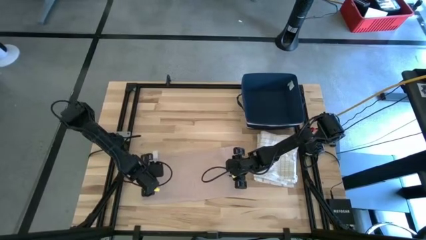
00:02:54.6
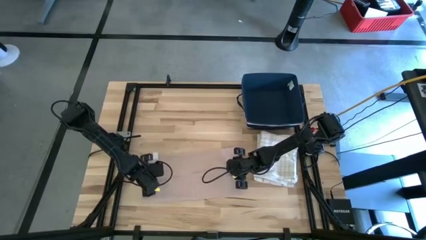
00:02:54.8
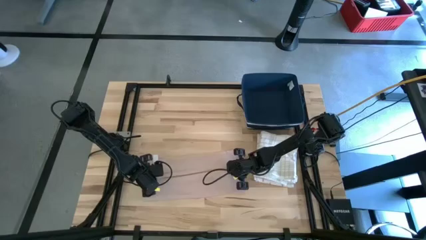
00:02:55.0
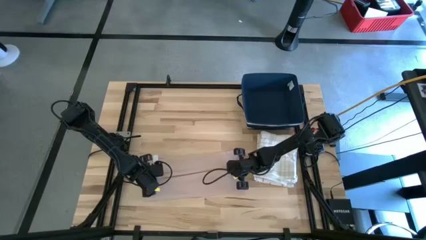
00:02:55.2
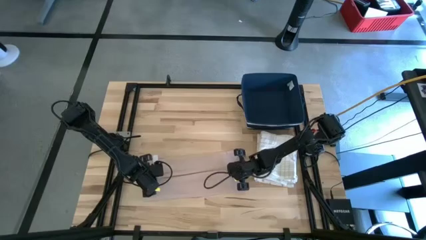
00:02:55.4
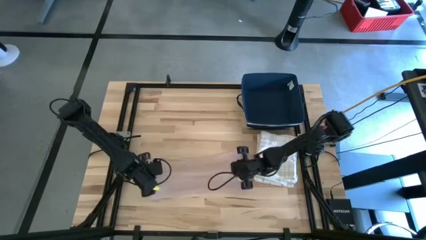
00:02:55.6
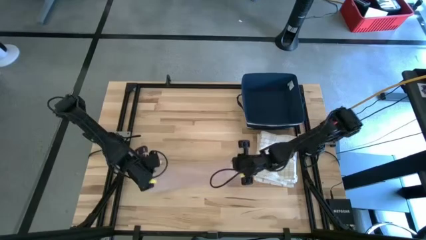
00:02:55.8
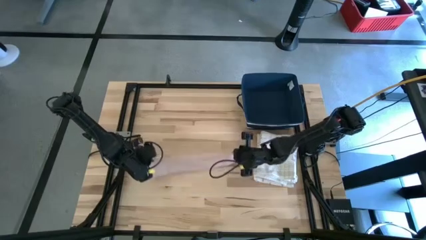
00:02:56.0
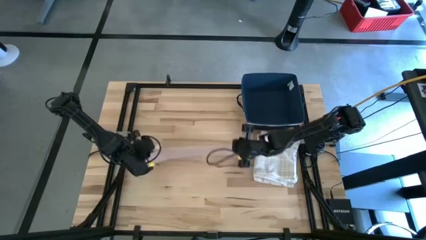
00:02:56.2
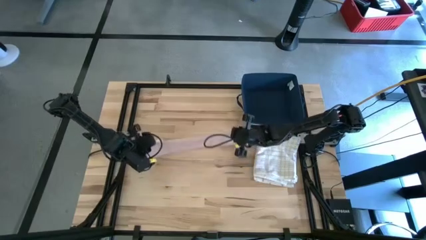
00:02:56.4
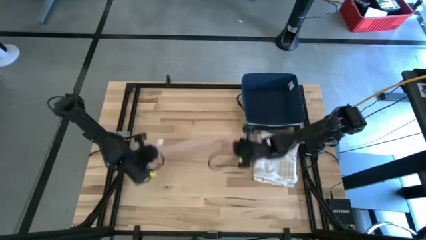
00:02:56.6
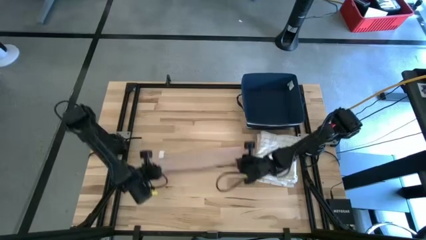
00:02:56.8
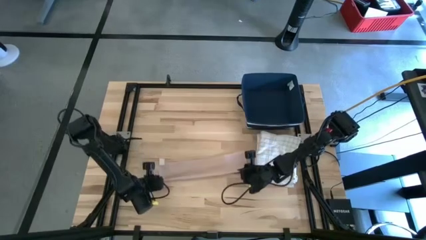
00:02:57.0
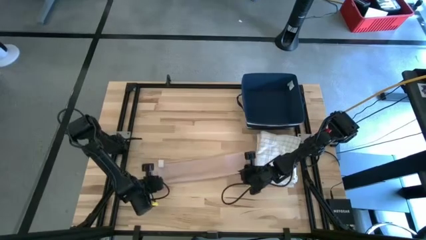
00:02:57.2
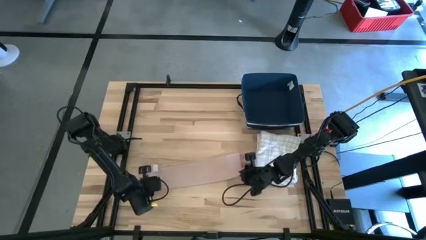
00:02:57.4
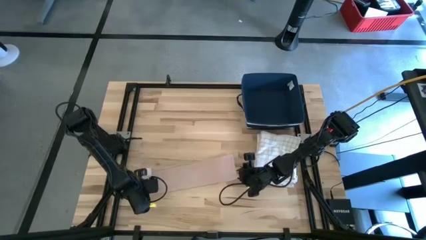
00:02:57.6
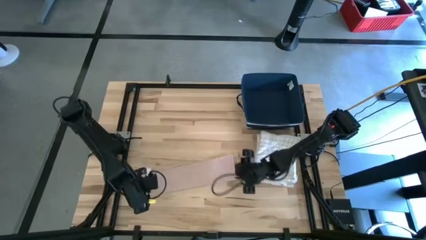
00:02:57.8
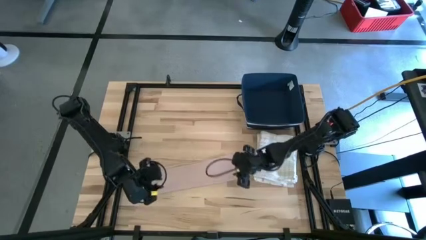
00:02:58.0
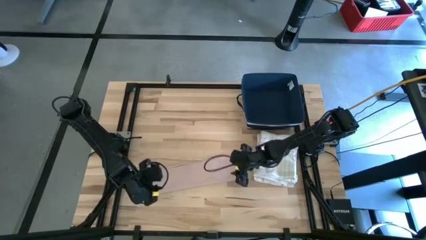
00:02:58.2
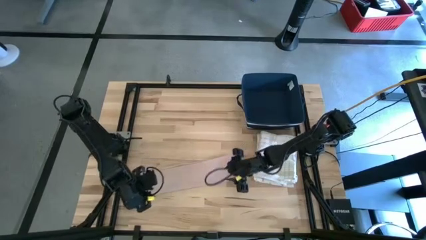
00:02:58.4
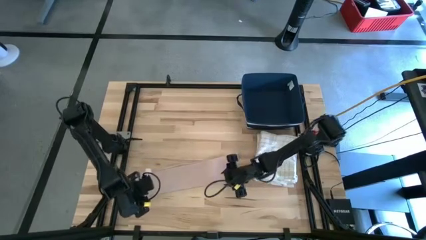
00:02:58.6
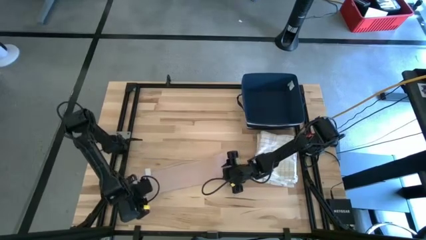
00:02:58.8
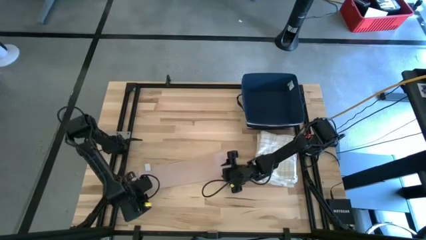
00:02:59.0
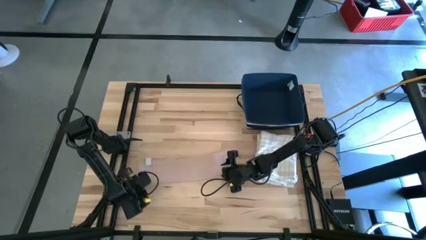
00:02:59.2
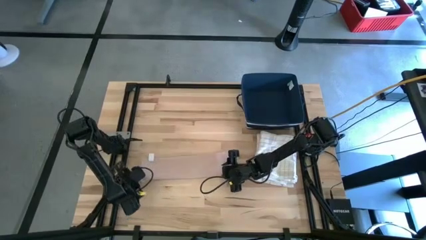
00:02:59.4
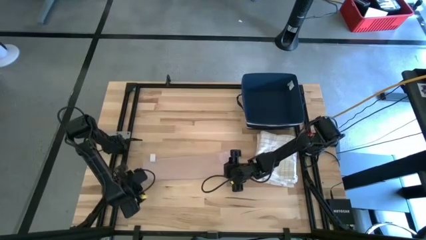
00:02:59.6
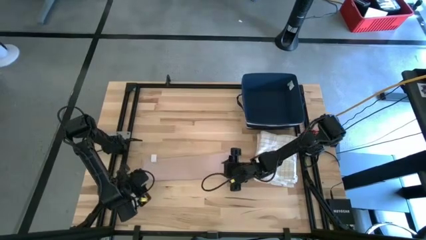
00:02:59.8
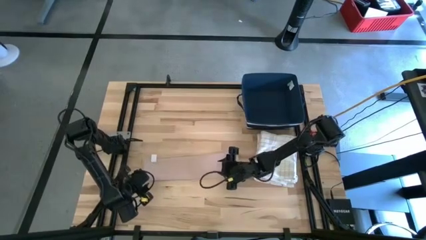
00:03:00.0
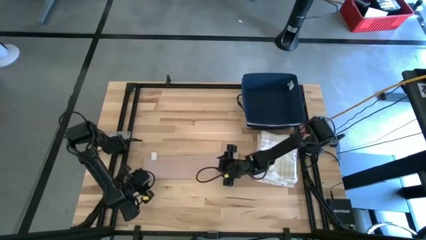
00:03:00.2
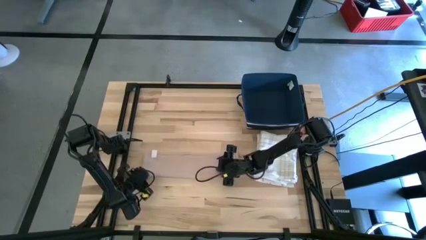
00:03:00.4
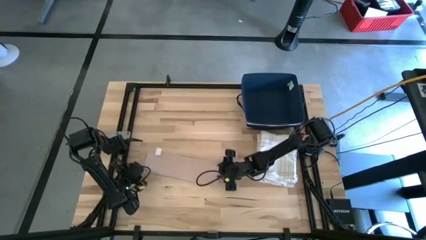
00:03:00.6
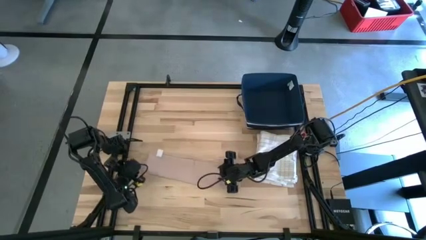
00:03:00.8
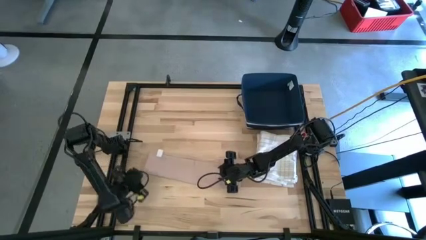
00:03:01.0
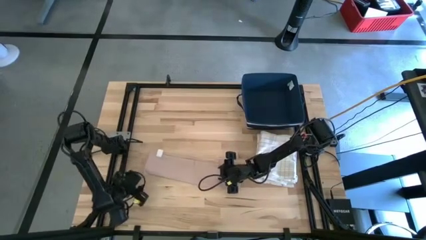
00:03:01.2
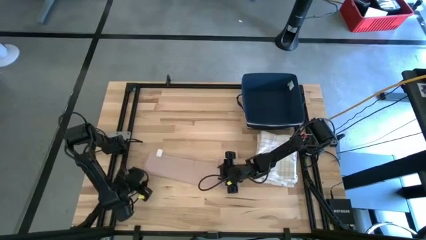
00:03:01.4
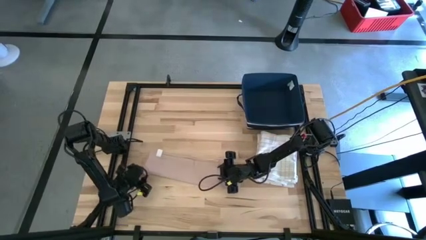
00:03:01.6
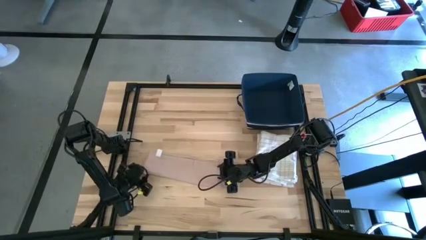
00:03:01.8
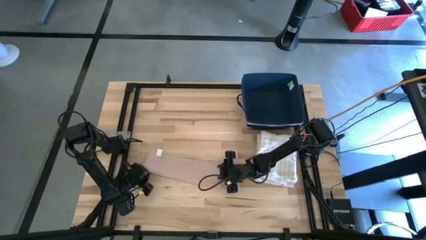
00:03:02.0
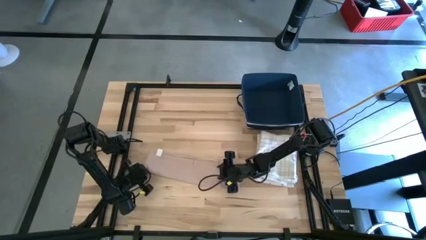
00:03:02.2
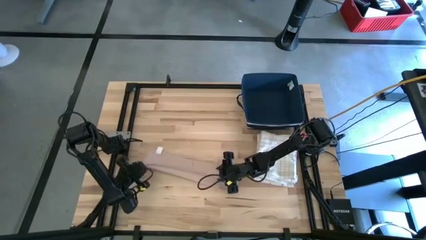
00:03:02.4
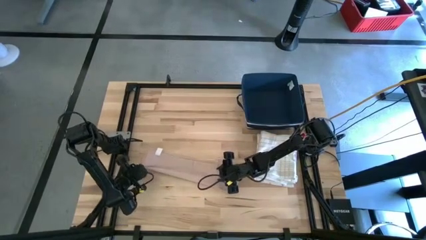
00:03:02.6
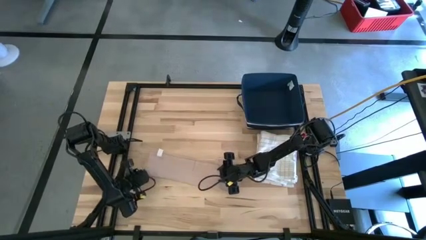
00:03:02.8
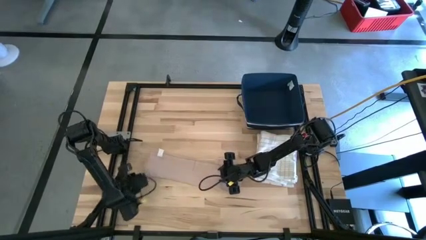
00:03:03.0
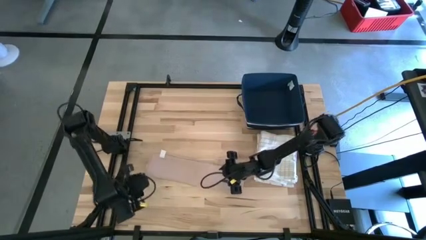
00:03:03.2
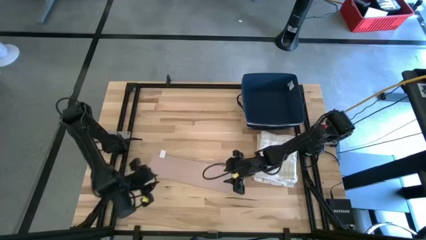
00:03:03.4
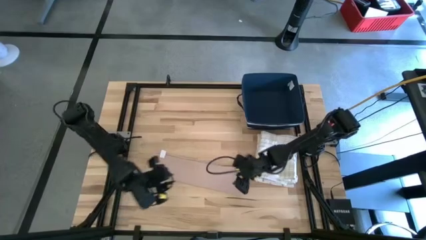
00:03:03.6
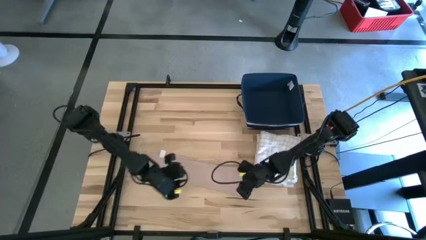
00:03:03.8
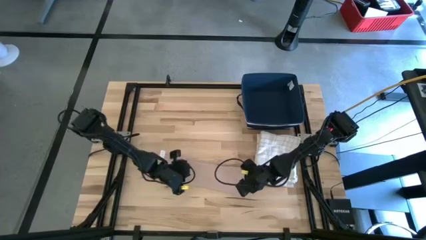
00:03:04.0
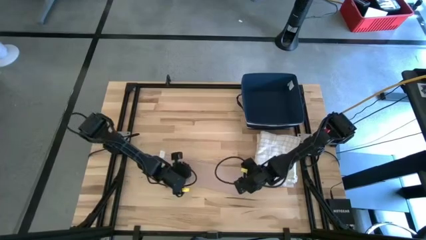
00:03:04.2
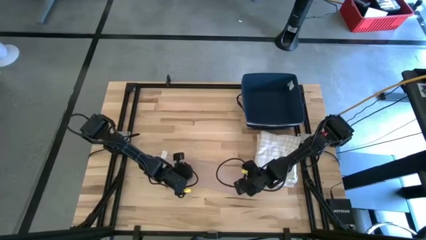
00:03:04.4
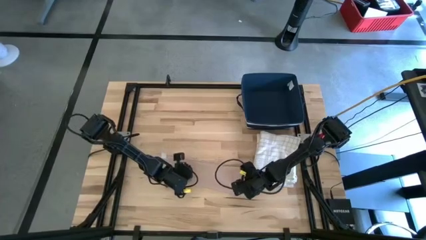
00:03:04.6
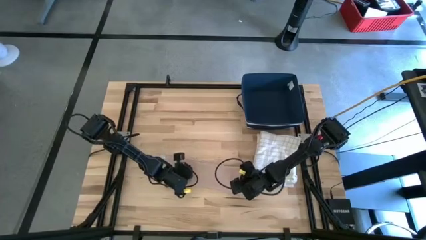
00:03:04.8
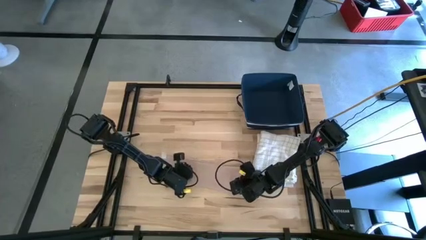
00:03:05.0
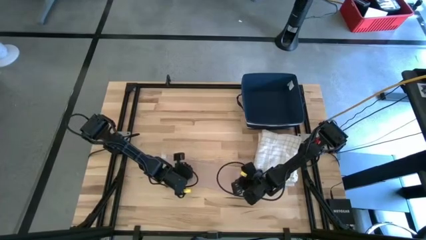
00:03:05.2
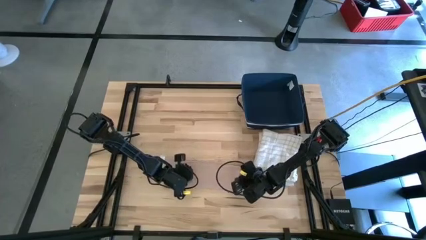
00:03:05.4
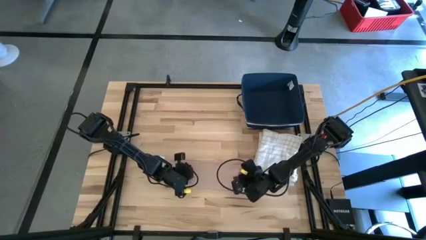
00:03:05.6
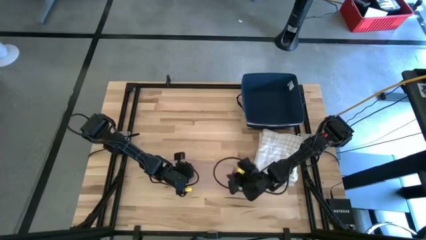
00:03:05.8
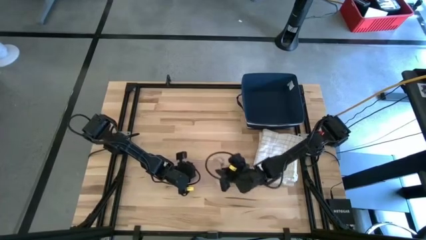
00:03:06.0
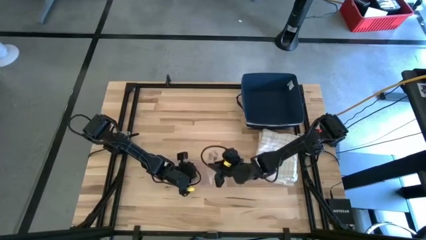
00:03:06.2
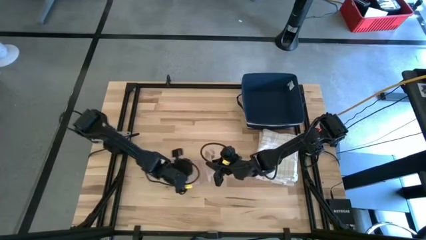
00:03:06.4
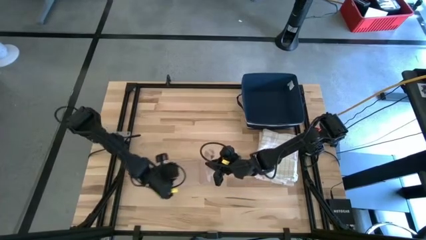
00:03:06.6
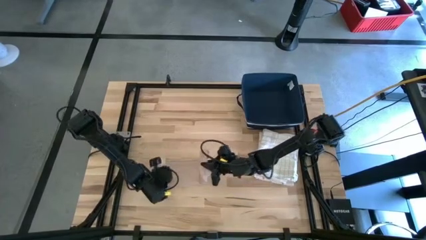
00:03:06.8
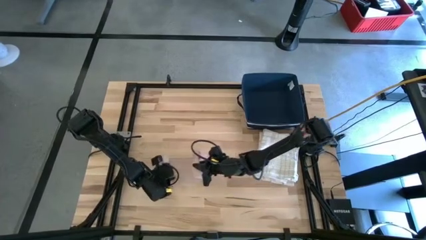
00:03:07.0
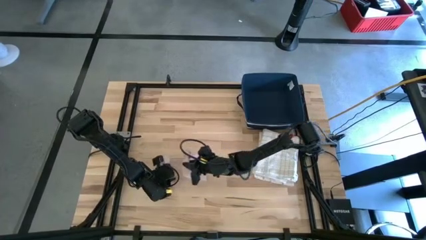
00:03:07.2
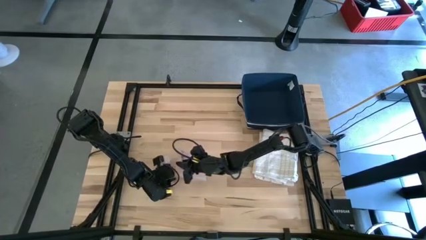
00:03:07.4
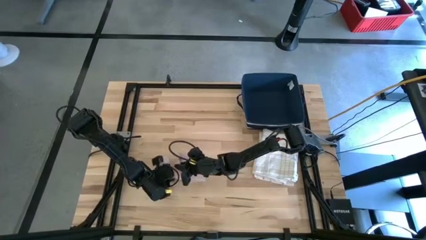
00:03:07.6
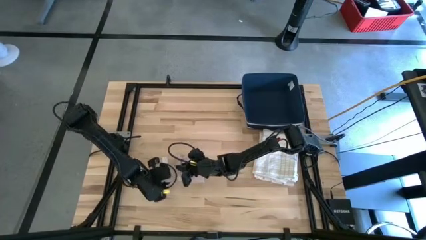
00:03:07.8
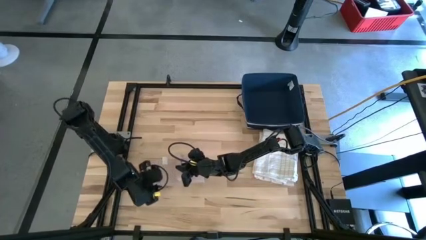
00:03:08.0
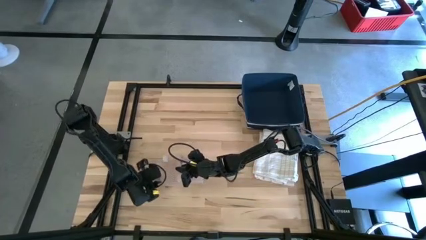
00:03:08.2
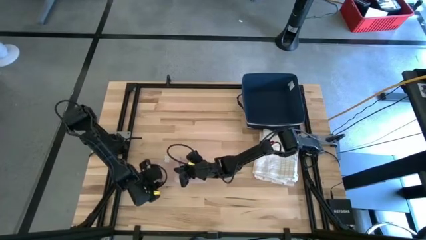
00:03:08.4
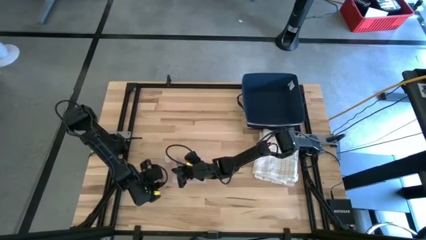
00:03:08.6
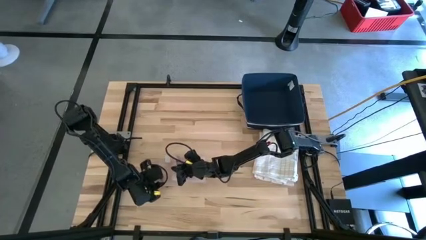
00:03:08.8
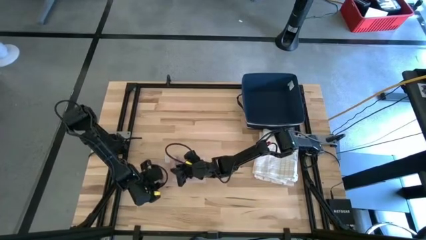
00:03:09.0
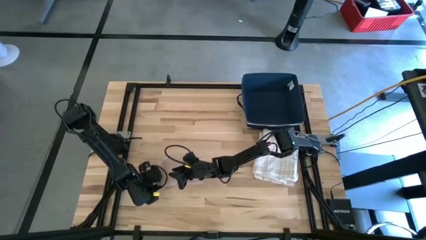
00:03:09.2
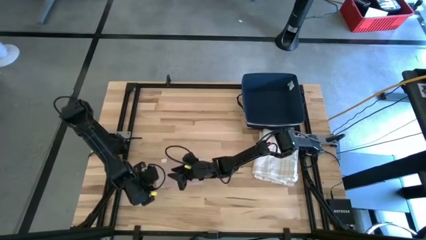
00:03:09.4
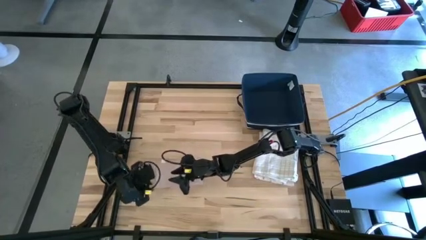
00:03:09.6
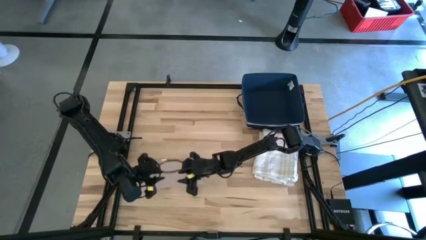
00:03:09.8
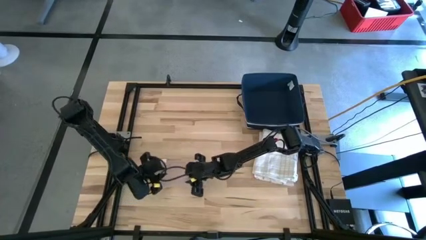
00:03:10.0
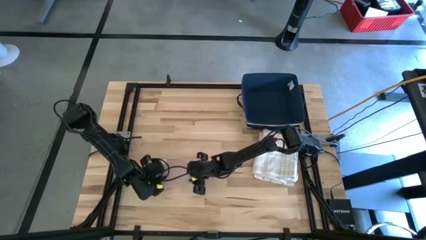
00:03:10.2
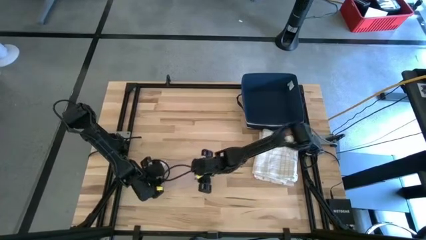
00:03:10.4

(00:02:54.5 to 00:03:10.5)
Task: Fold towel
Fold the light brown towel
